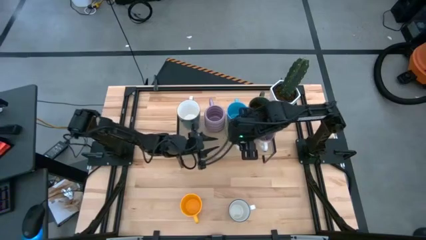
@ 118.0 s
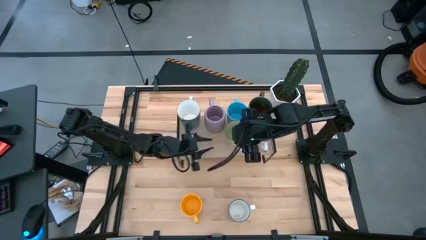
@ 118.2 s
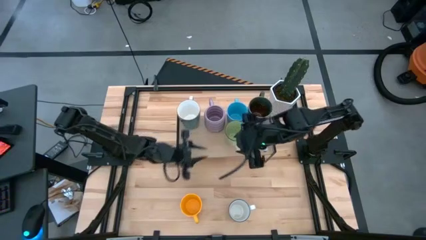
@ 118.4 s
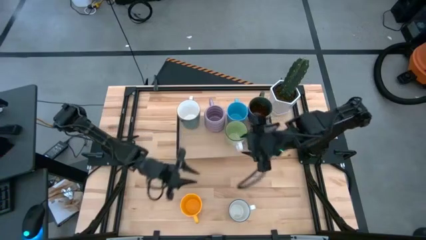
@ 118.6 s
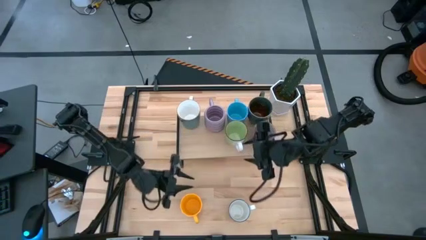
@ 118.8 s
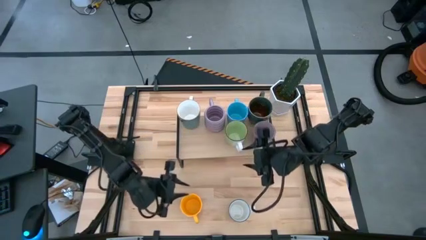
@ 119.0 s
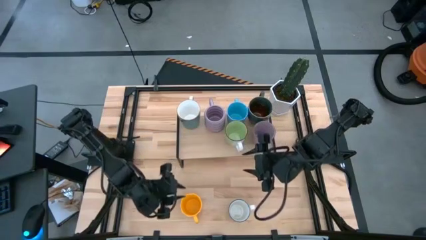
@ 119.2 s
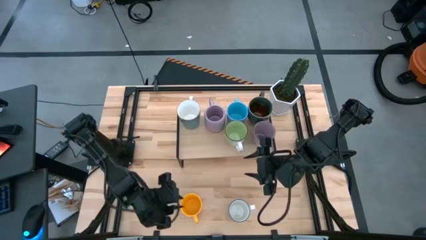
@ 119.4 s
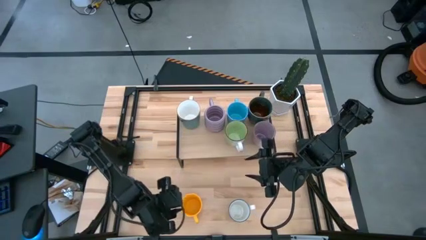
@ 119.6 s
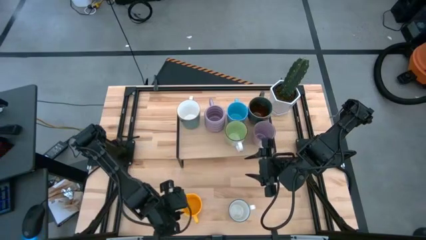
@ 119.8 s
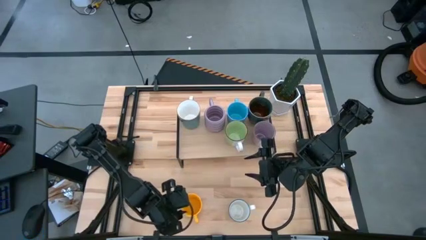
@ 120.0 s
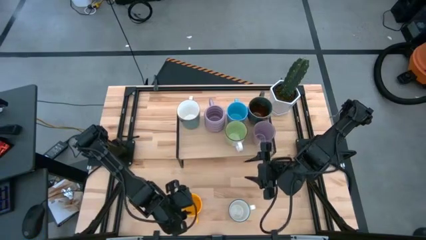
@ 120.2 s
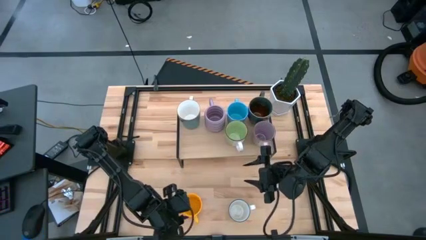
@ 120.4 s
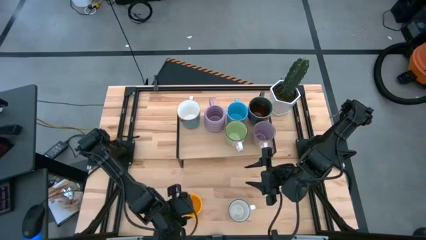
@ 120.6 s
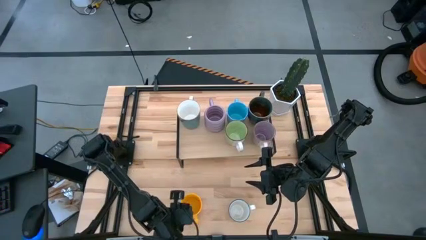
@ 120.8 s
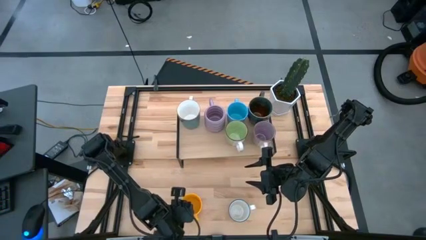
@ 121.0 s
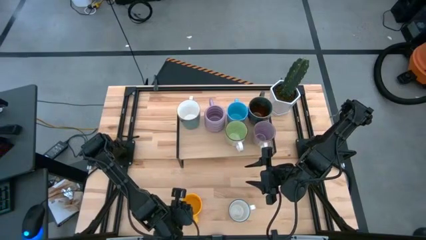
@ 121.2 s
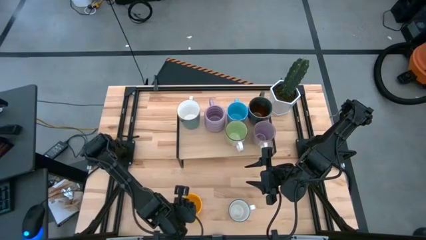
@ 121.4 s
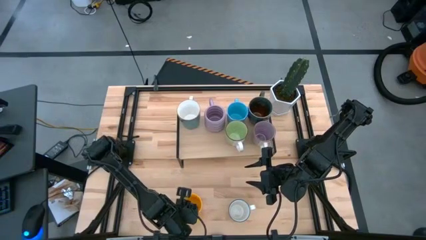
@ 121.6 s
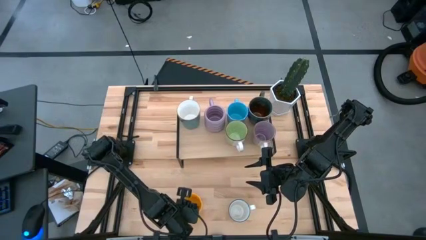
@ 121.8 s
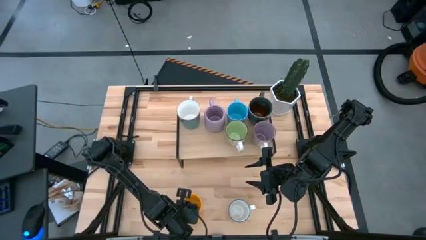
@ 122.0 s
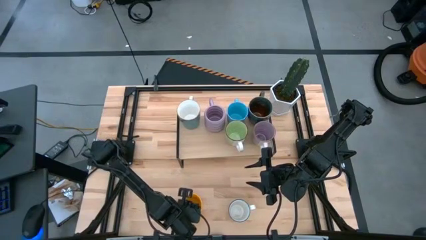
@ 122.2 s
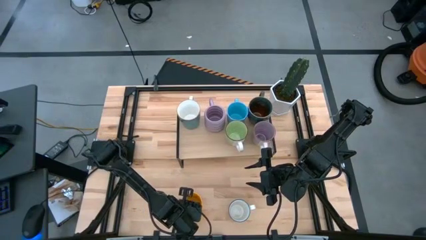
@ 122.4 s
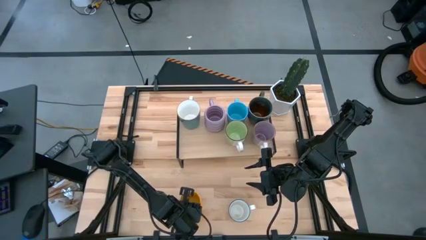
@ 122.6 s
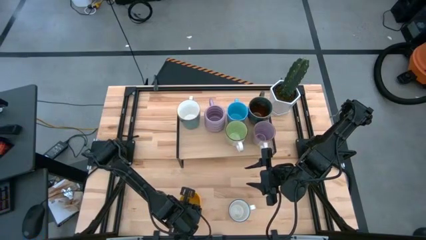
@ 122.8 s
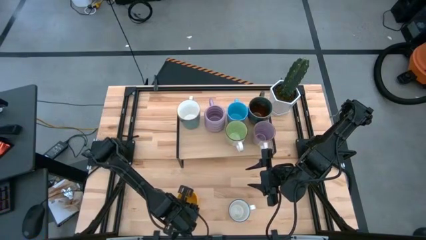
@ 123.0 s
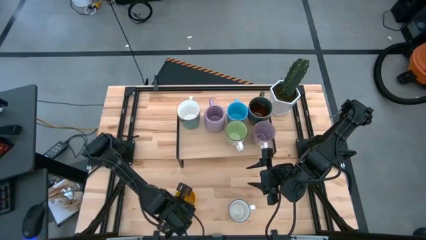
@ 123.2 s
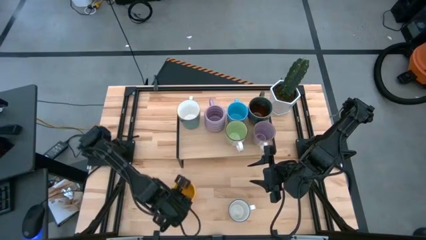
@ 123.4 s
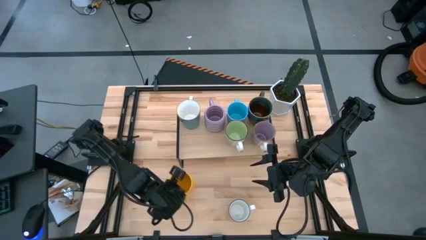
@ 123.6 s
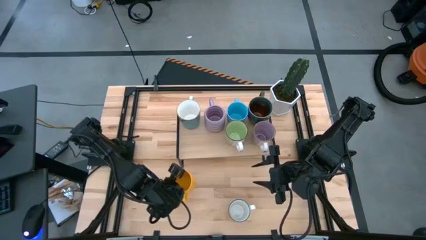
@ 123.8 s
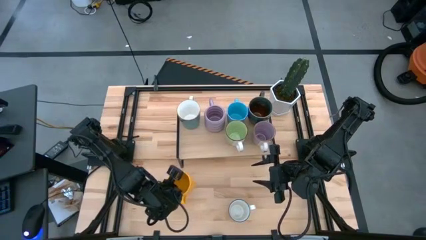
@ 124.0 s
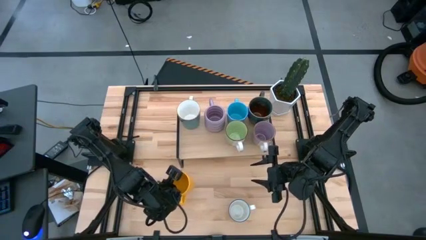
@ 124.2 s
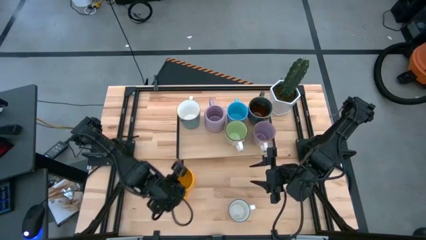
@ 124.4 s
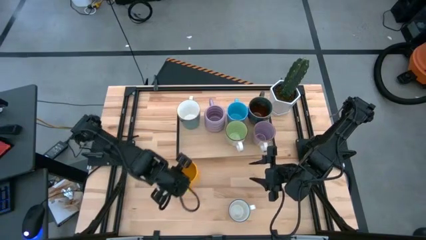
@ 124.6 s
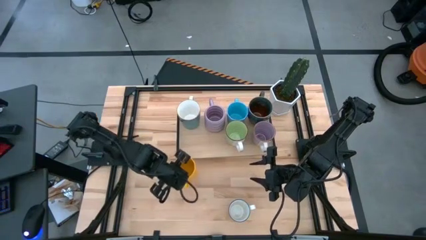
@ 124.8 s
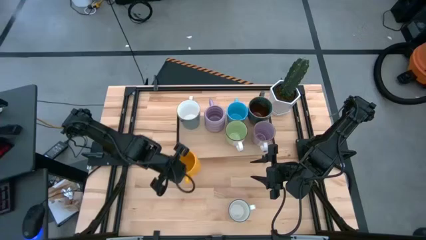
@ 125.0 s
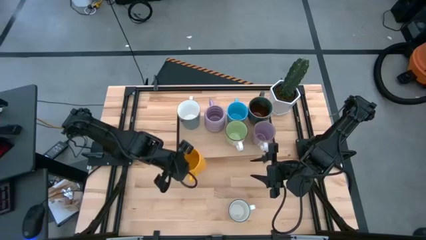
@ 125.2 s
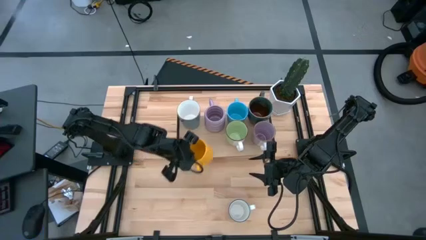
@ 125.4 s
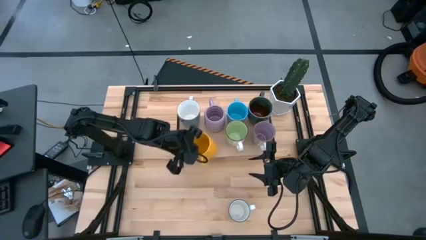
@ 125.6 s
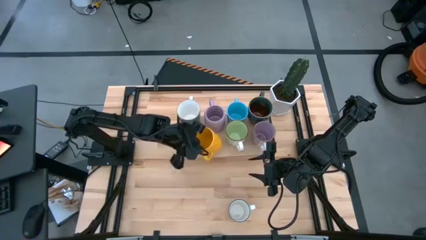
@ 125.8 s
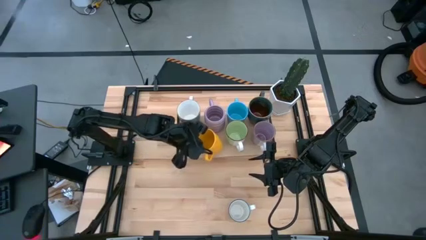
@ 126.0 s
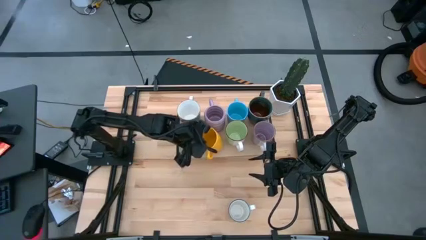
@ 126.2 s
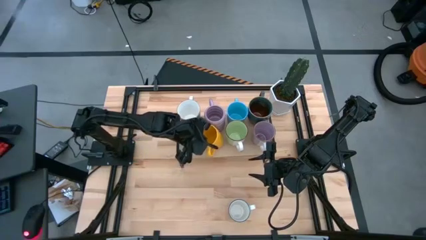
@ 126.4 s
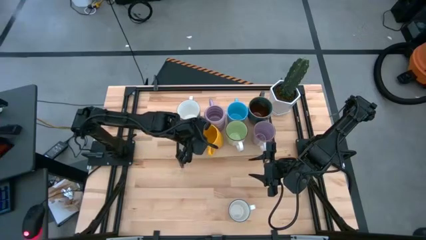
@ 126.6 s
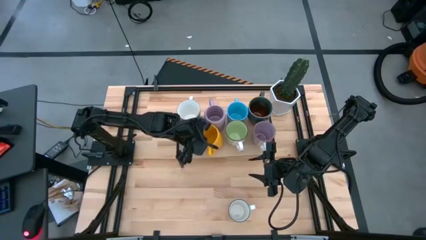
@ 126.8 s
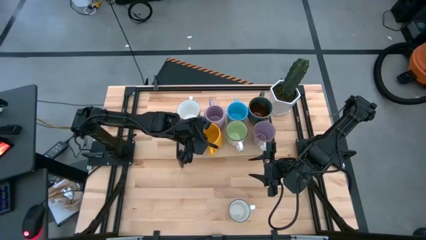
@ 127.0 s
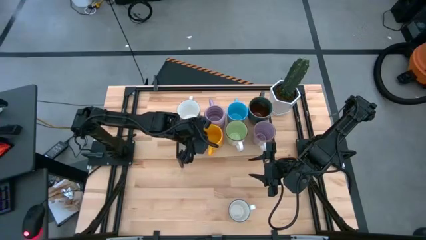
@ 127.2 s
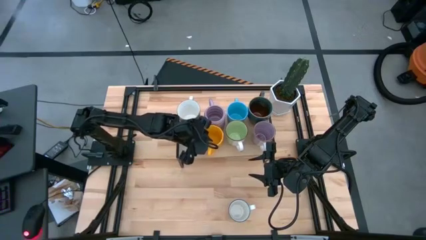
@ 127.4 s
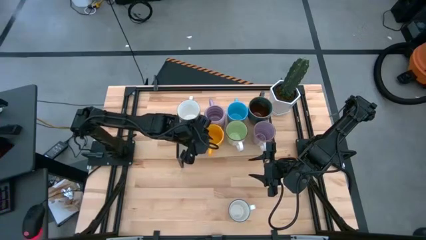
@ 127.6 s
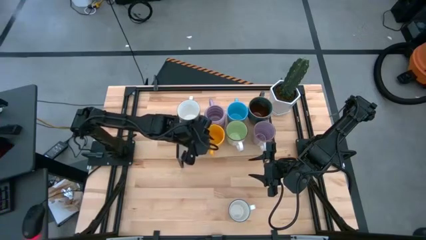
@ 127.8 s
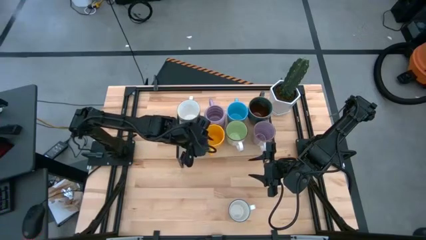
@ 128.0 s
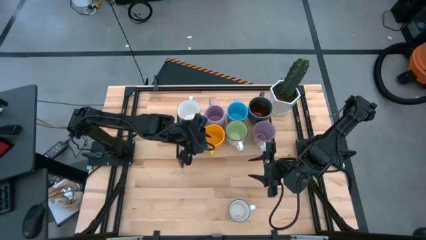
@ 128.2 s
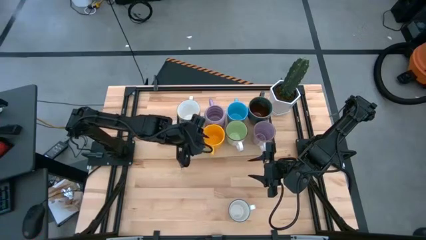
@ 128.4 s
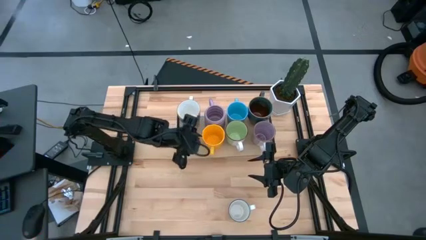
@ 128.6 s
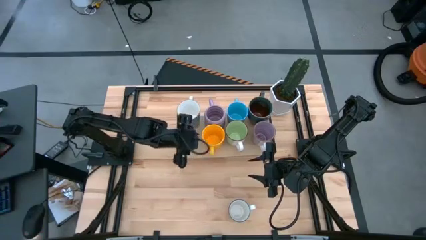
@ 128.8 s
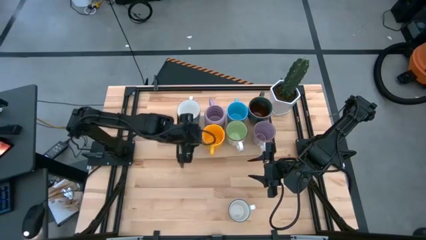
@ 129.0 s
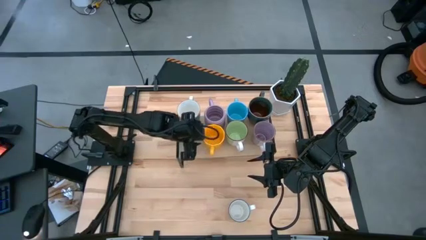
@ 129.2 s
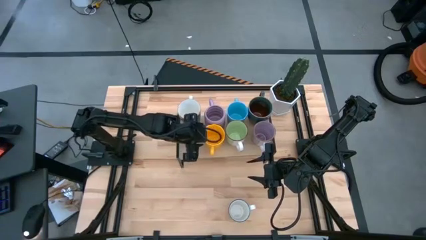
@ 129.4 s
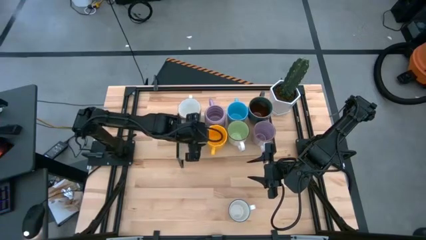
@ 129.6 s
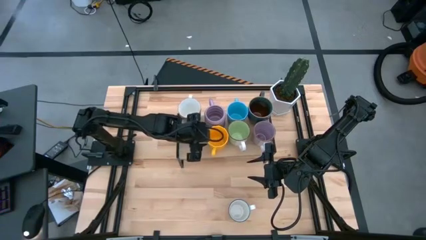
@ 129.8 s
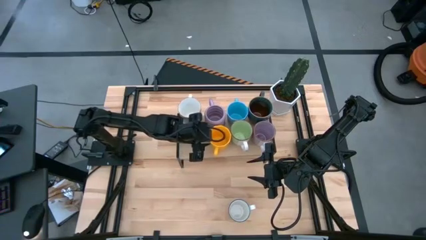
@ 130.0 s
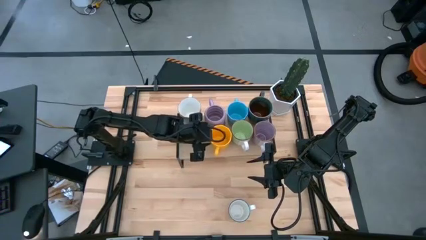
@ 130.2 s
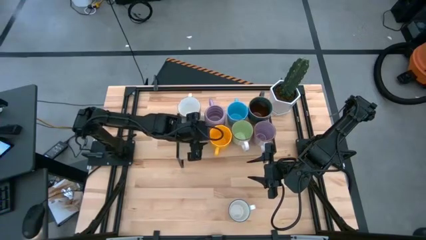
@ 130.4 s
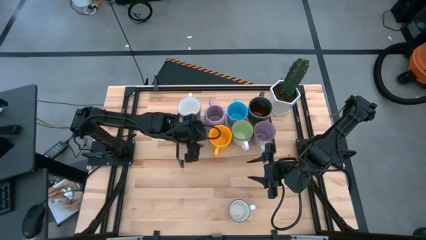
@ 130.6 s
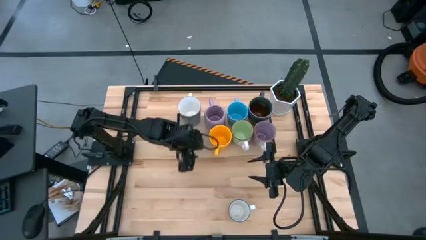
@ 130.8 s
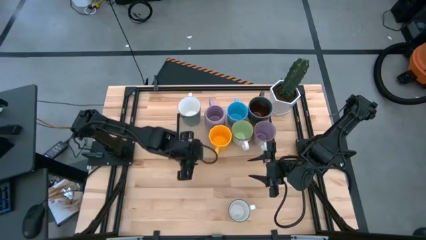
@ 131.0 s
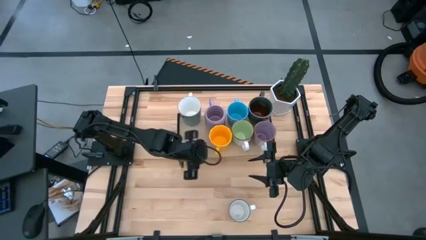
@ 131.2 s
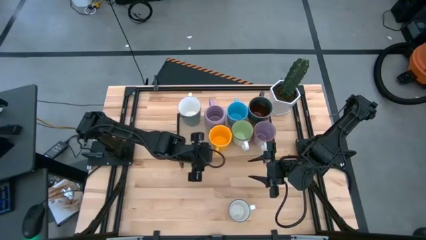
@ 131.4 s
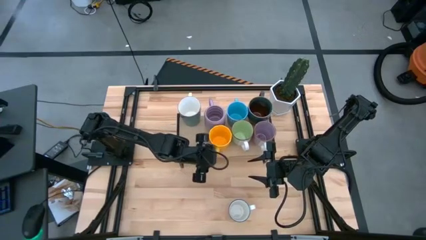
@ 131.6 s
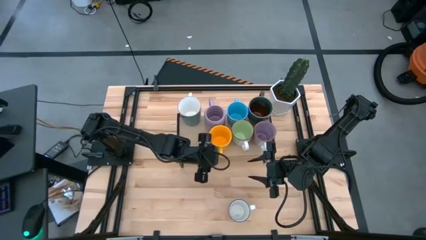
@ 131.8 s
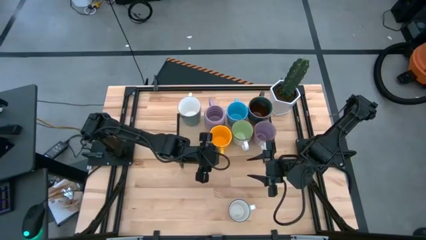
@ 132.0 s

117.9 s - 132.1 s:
Task: Place coffee mugs
Put the yellow mug on the shelf
